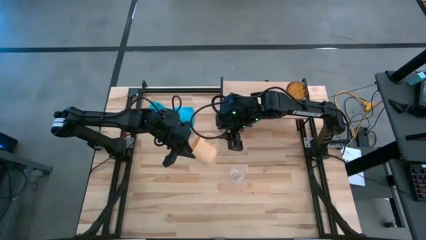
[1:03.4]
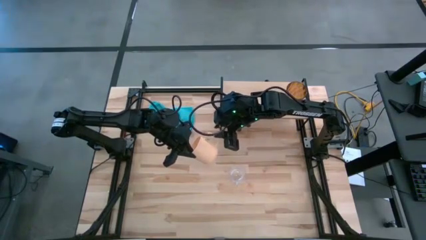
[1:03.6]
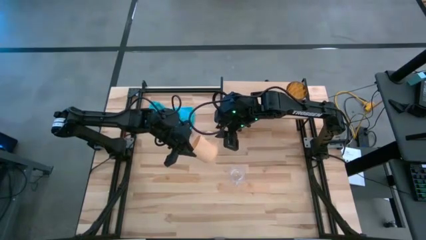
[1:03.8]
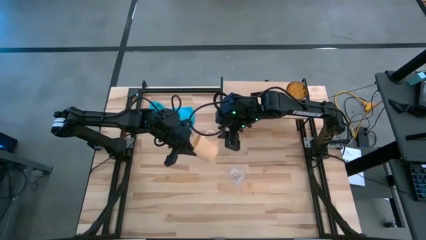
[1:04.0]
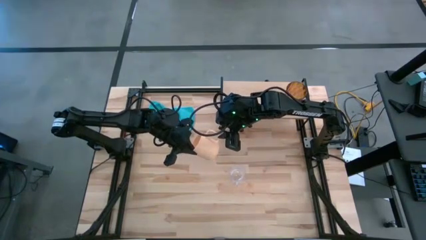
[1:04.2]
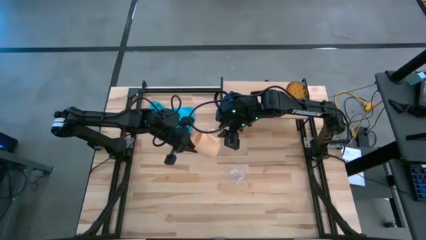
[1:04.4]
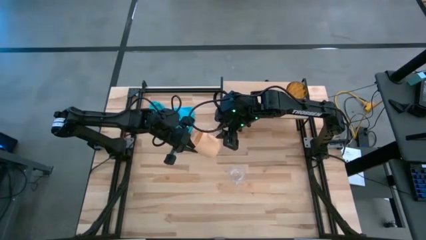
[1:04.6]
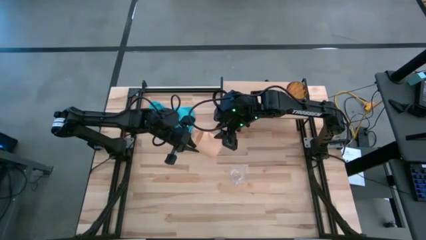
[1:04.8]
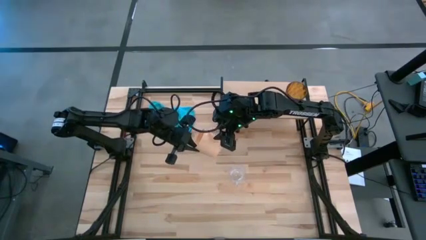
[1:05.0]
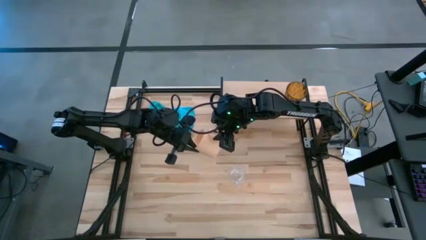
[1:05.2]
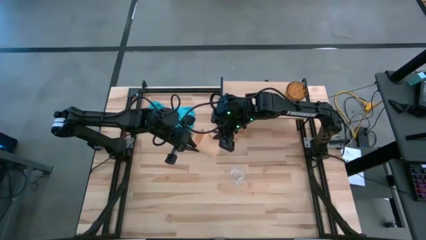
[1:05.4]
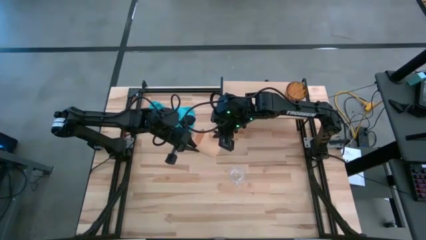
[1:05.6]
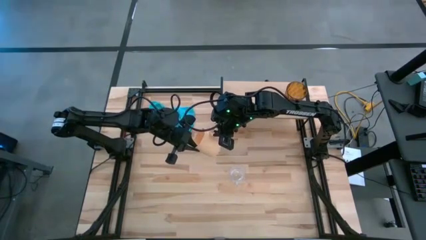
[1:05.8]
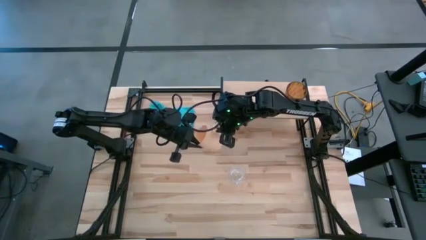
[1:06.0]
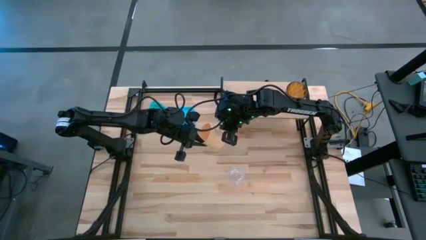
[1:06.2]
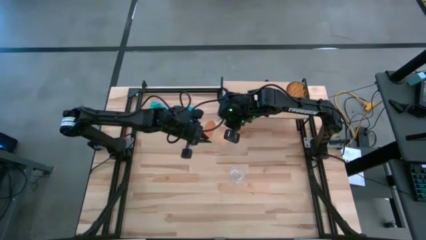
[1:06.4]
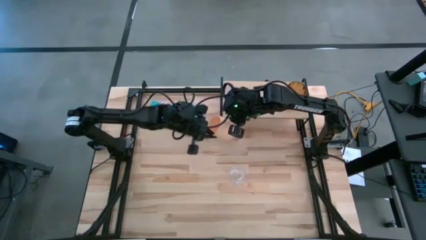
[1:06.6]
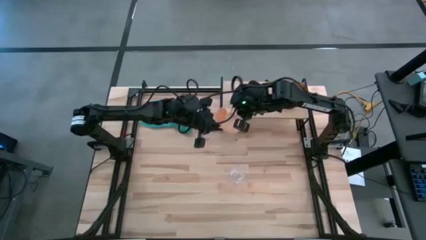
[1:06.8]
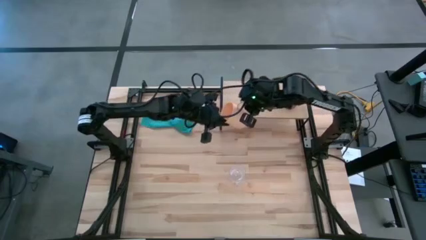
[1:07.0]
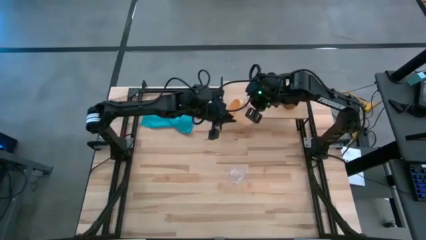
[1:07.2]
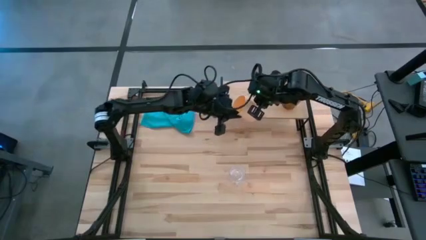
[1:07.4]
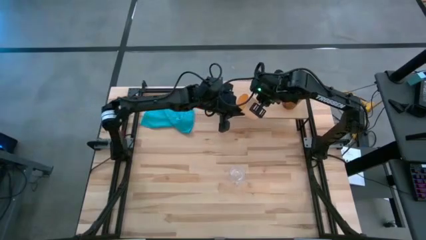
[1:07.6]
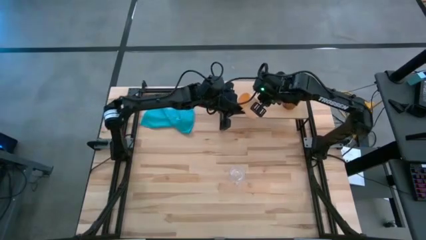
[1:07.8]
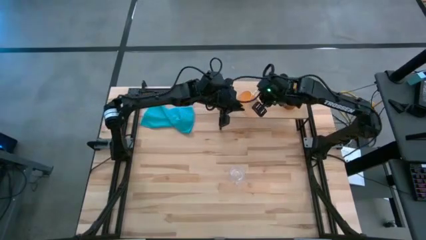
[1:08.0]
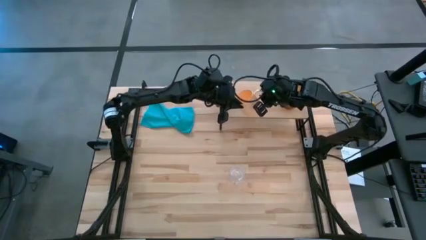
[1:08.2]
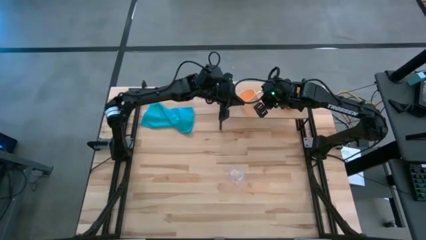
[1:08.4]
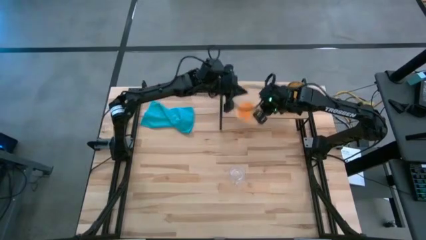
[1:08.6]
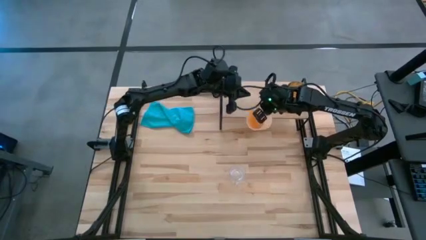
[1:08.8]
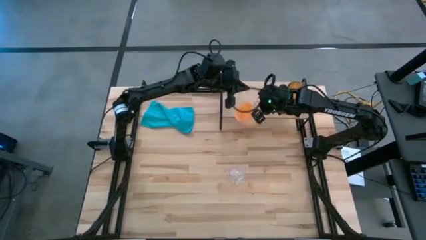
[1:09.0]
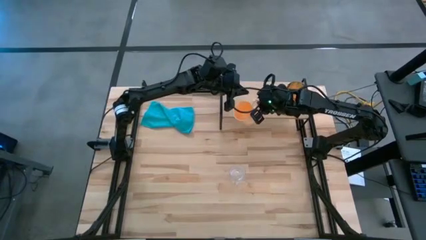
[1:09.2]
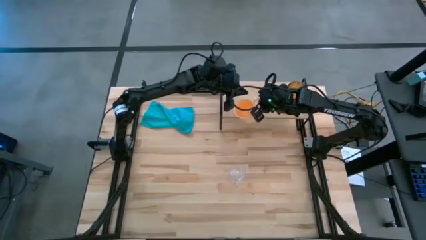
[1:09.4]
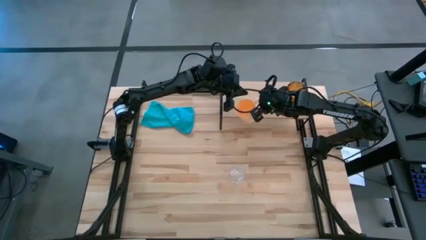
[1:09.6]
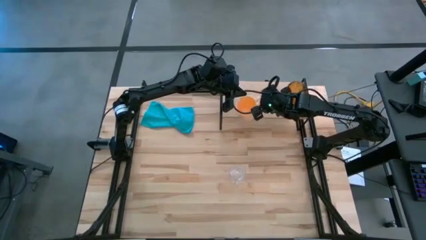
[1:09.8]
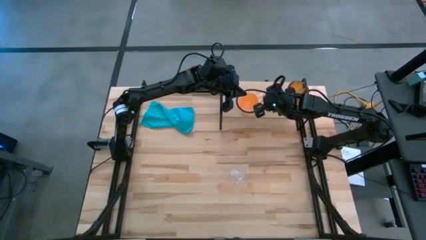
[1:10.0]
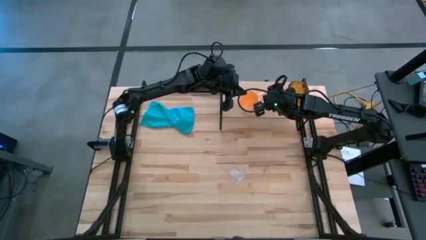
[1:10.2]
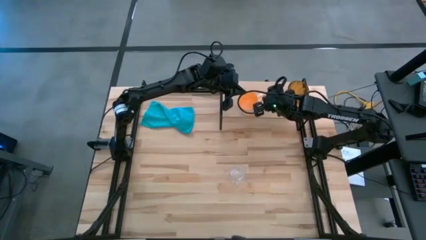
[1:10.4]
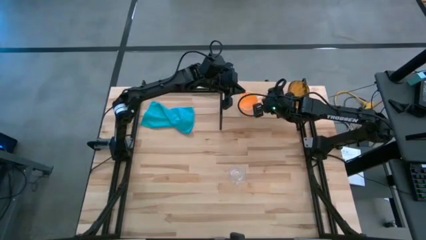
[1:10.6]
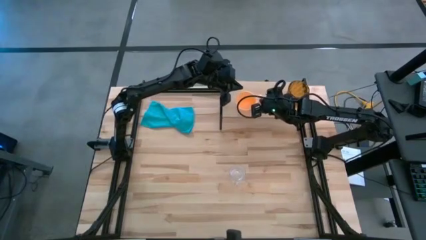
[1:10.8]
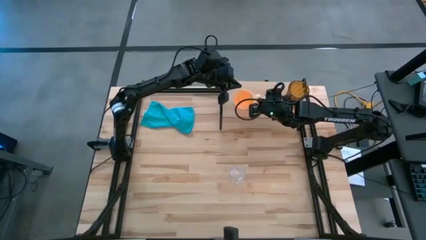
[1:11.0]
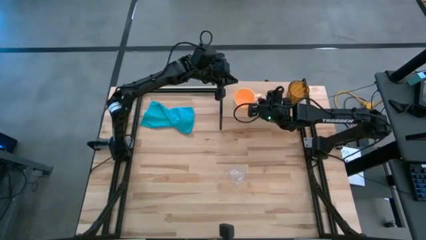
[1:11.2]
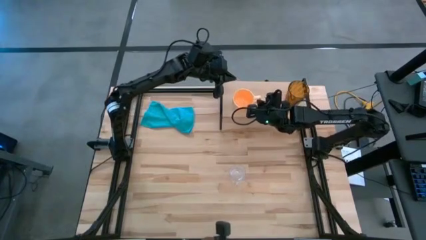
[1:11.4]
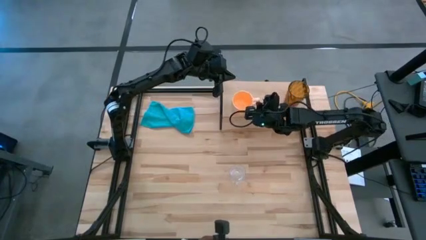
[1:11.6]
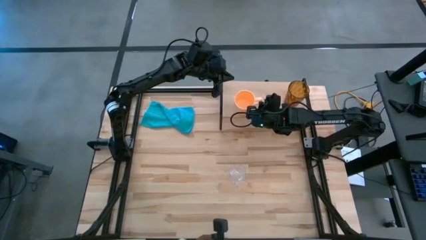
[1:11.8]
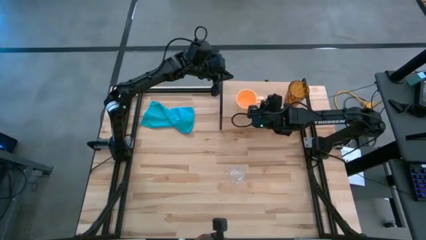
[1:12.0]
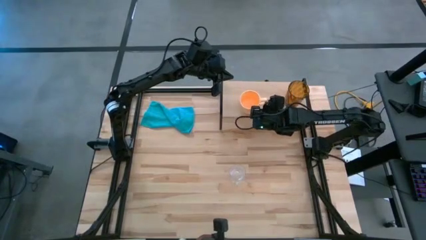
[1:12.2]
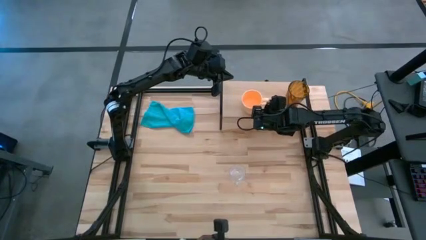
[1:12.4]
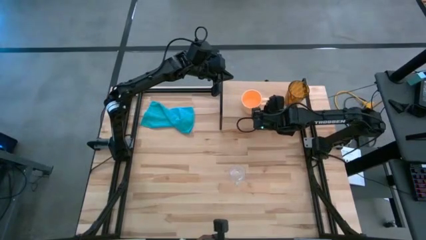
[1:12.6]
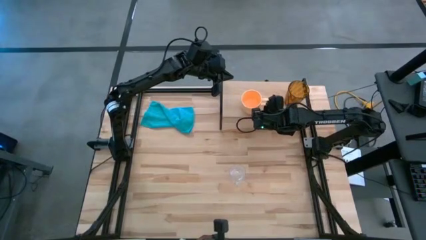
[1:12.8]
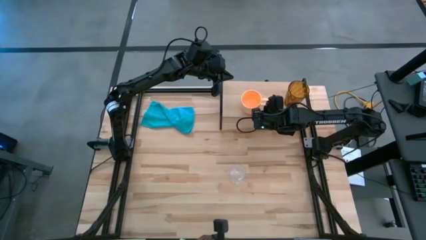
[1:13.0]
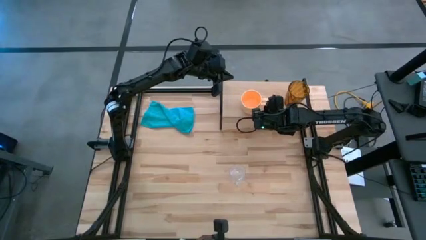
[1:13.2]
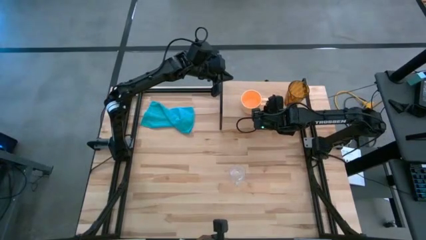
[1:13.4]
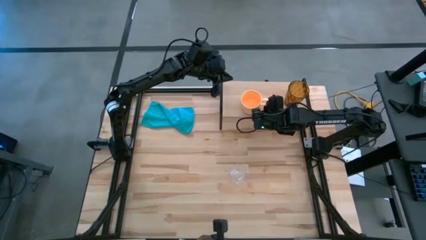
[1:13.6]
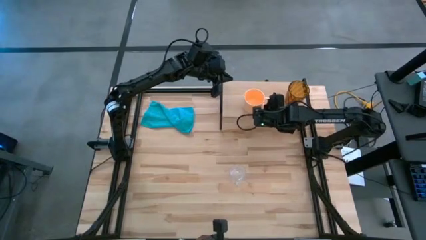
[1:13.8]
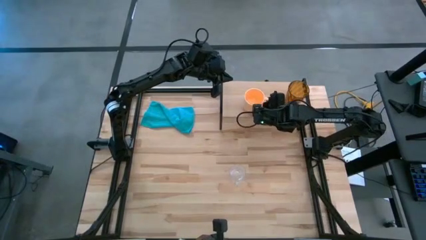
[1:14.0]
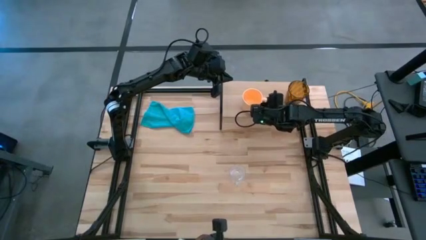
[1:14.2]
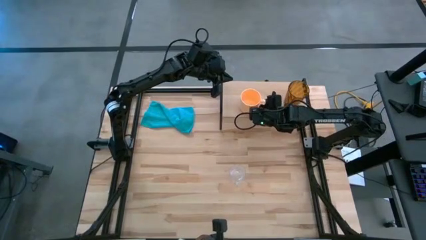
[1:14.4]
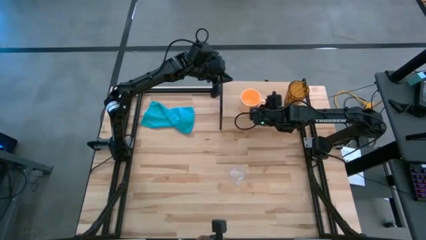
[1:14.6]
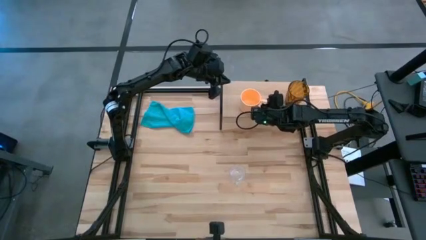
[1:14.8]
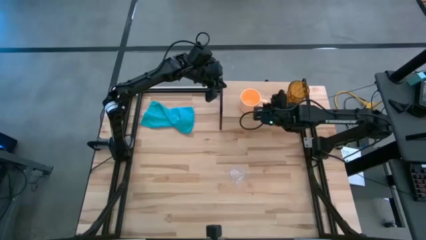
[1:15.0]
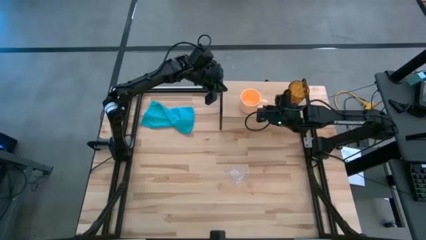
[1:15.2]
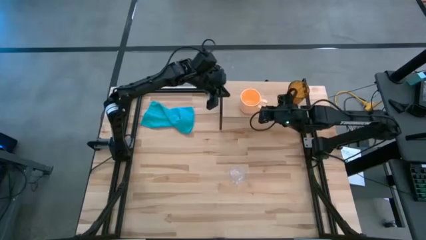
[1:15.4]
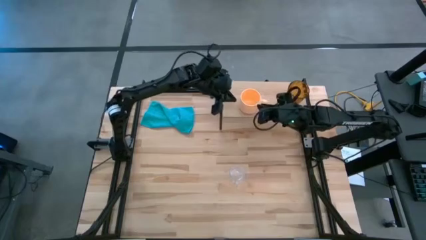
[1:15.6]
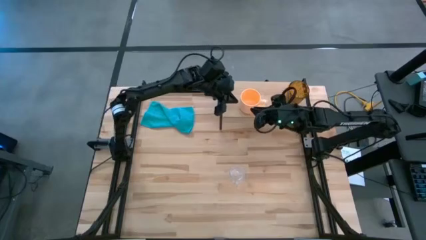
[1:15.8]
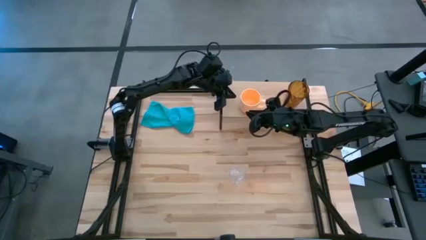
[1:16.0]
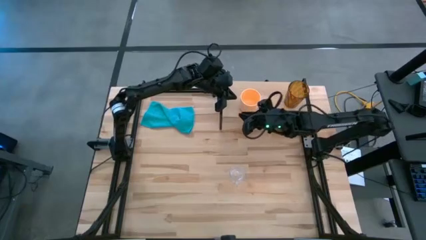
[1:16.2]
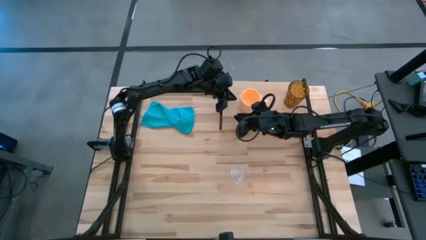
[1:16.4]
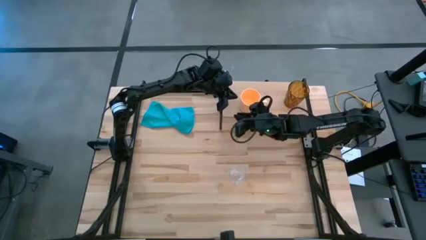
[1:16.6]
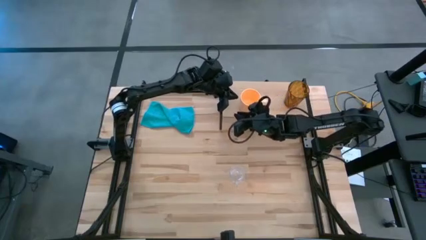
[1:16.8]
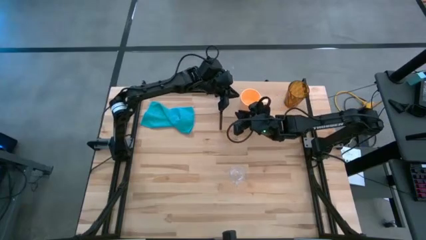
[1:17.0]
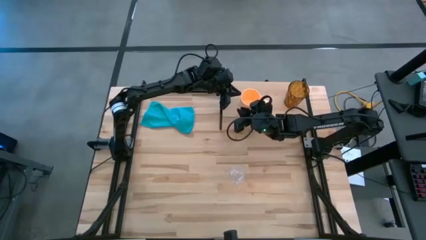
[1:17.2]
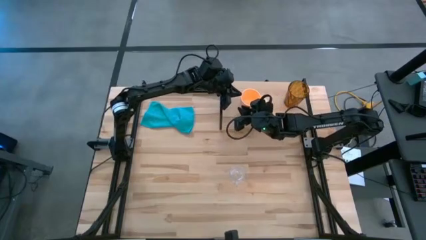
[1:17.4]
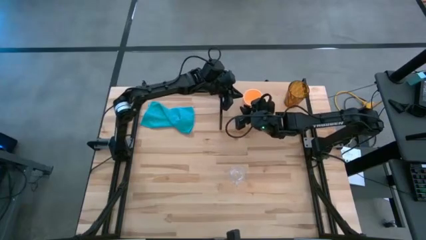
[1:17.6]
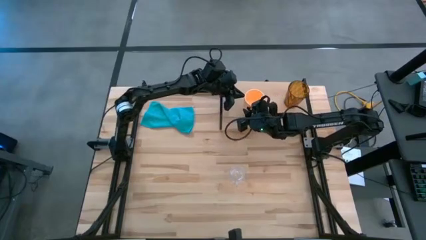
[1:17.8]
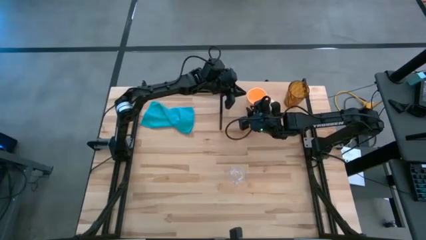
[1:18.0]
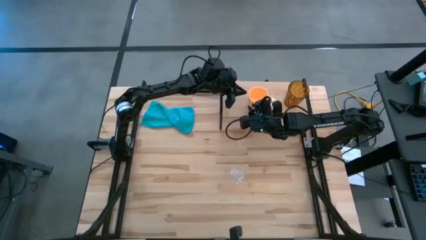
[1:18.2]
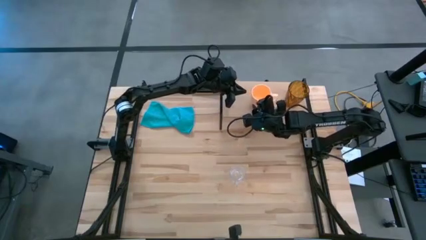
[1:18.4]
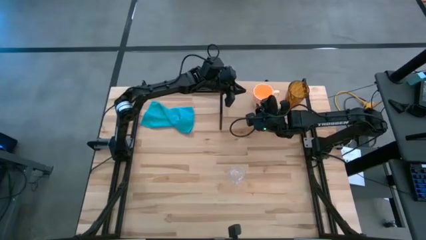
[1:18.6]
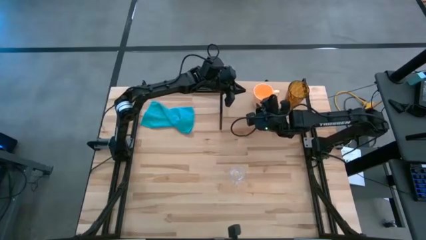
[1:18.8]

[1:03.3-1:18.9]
Task: Stack small to large cups/mugs on shelf
Put the yellow mug on the shelf
